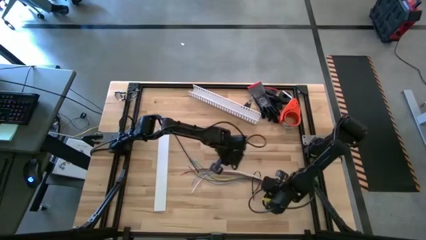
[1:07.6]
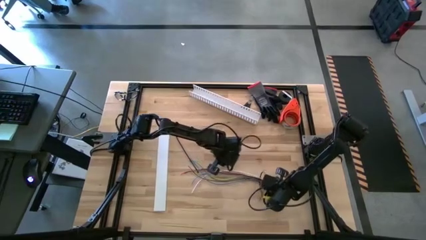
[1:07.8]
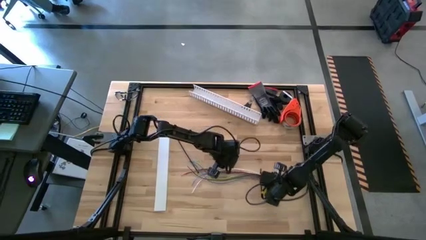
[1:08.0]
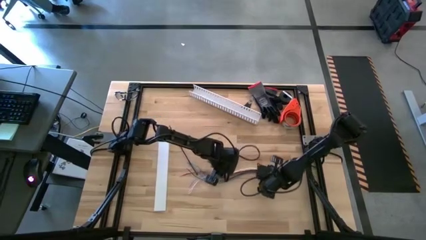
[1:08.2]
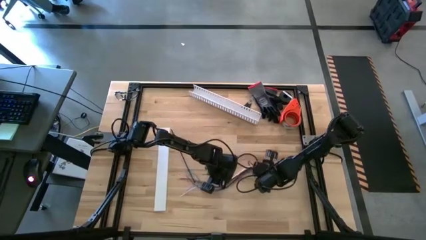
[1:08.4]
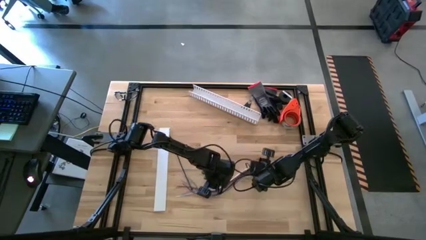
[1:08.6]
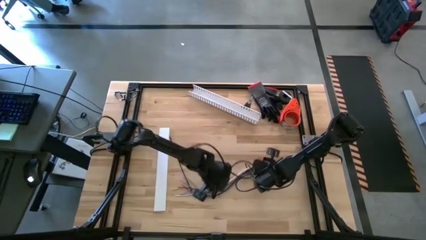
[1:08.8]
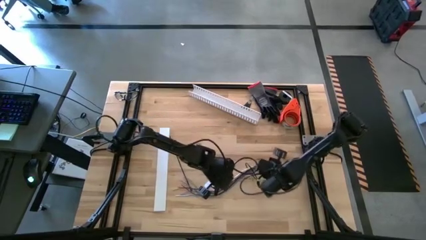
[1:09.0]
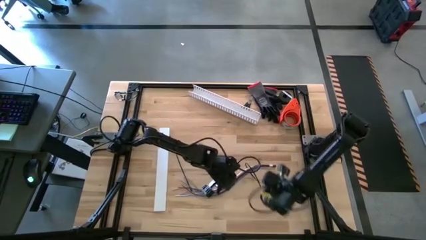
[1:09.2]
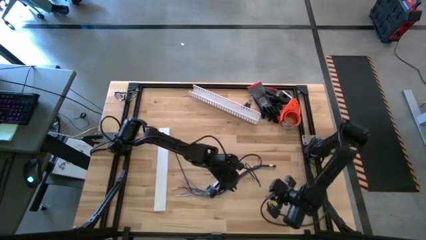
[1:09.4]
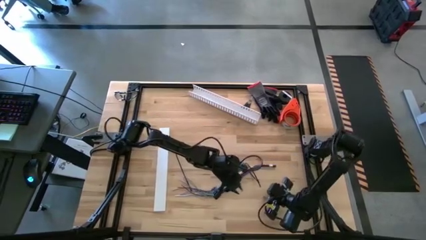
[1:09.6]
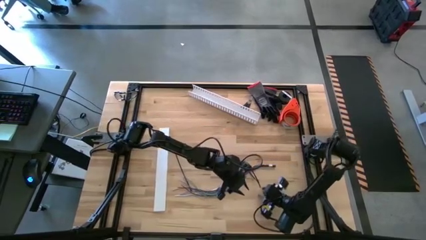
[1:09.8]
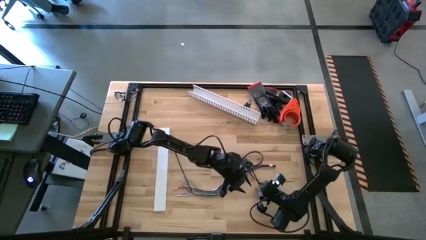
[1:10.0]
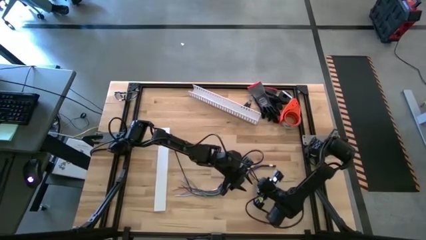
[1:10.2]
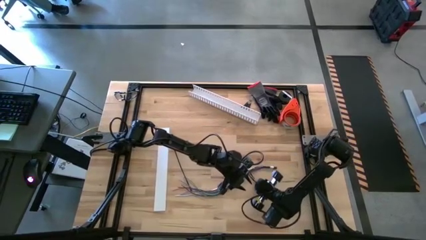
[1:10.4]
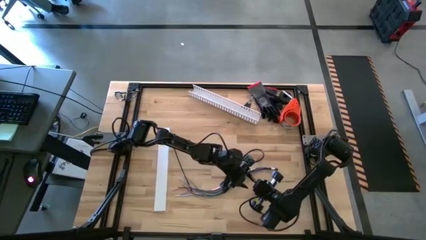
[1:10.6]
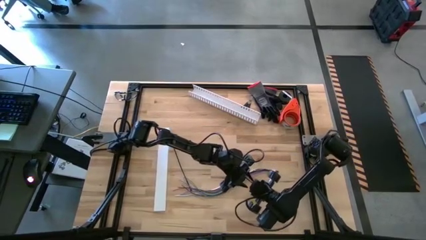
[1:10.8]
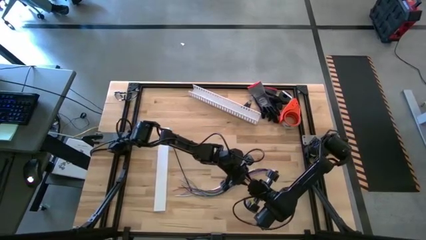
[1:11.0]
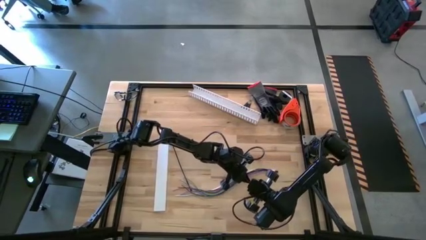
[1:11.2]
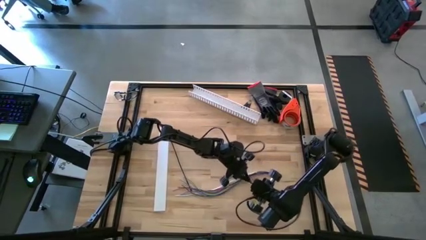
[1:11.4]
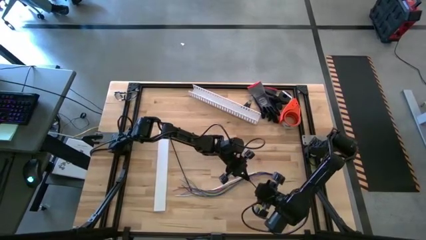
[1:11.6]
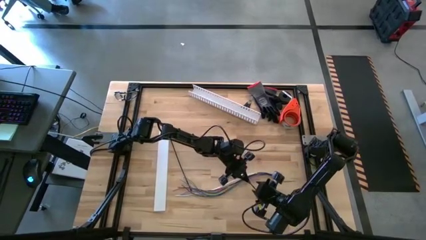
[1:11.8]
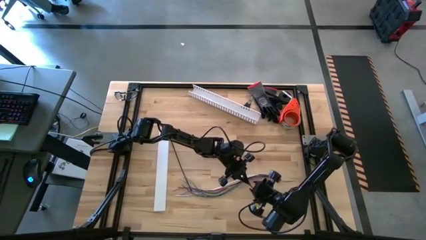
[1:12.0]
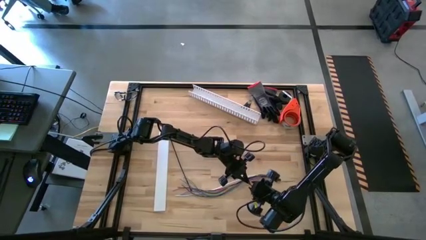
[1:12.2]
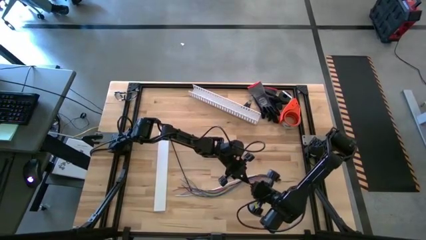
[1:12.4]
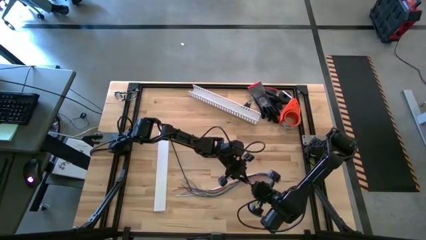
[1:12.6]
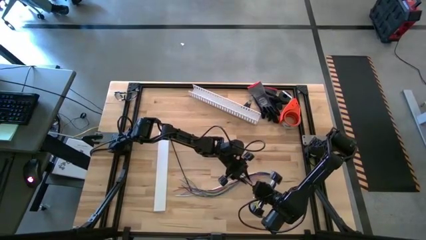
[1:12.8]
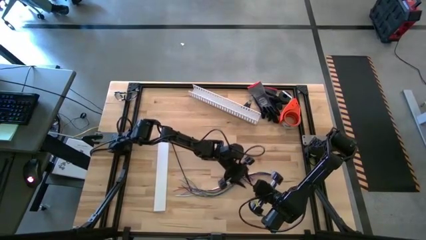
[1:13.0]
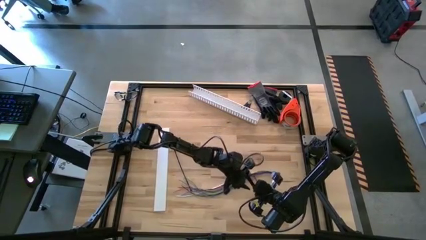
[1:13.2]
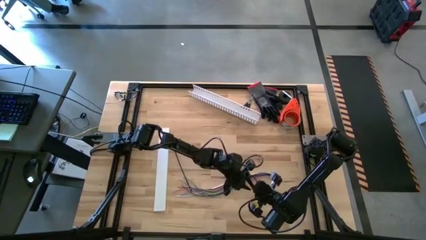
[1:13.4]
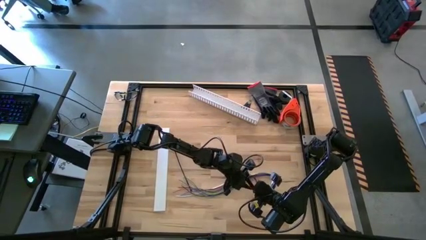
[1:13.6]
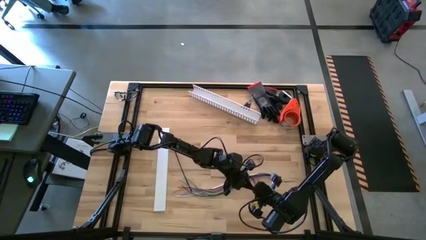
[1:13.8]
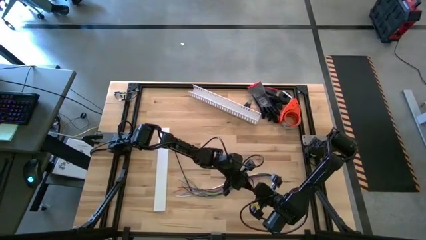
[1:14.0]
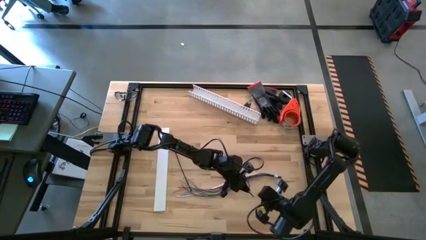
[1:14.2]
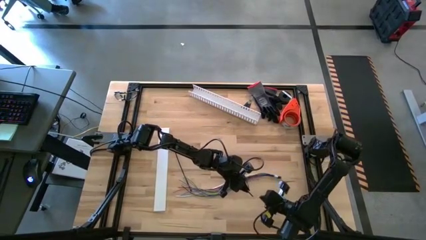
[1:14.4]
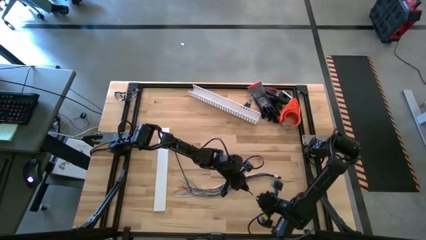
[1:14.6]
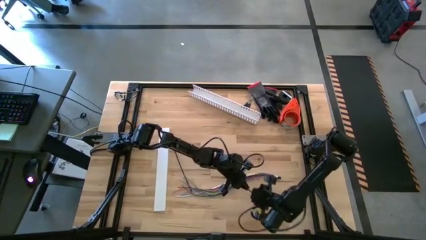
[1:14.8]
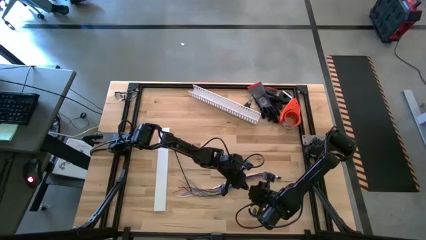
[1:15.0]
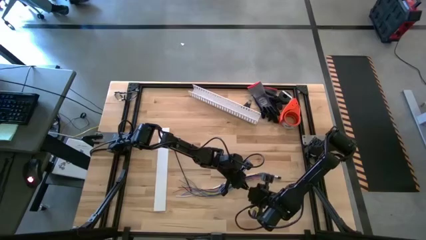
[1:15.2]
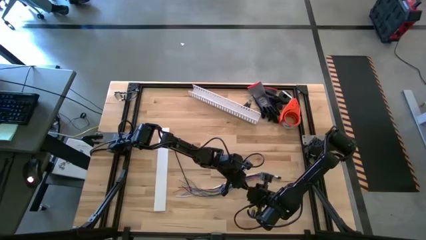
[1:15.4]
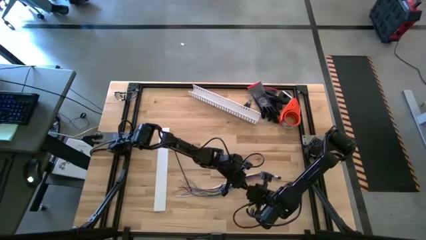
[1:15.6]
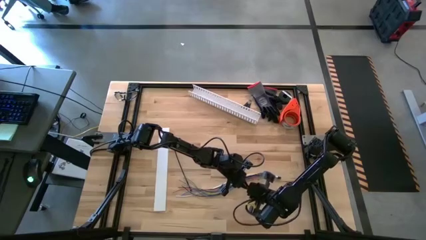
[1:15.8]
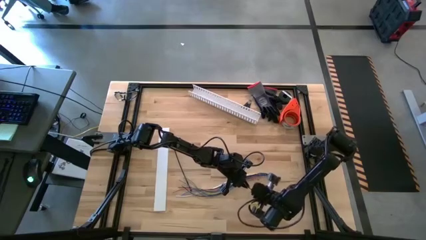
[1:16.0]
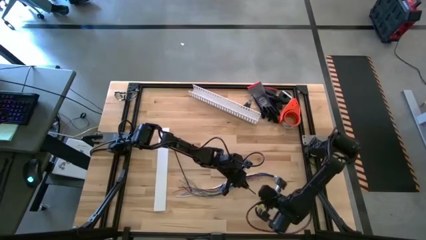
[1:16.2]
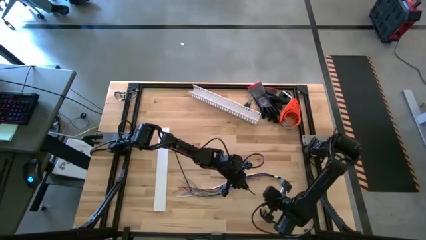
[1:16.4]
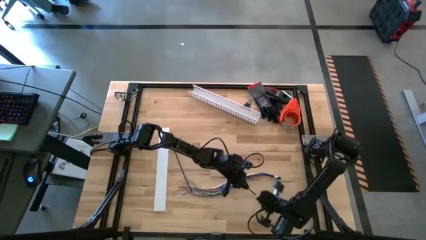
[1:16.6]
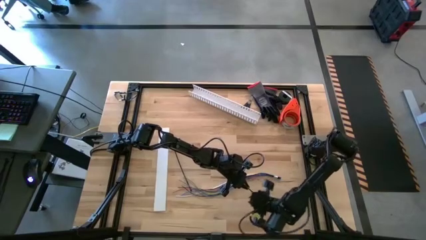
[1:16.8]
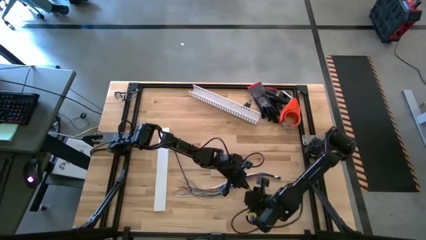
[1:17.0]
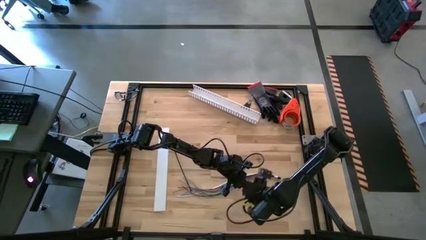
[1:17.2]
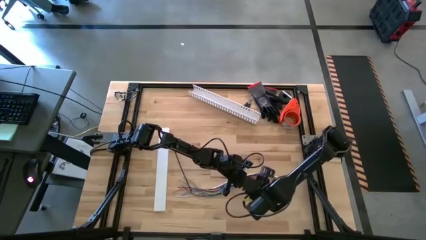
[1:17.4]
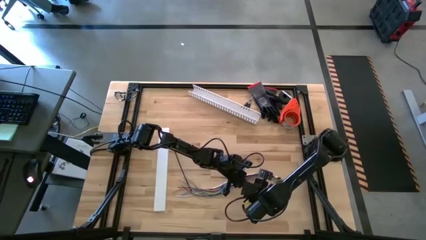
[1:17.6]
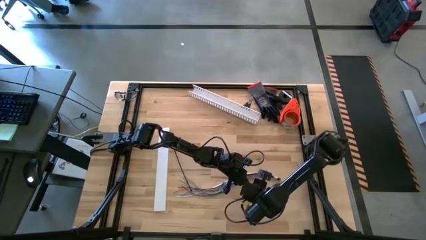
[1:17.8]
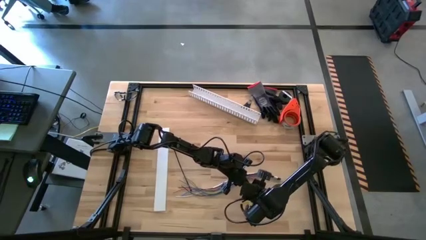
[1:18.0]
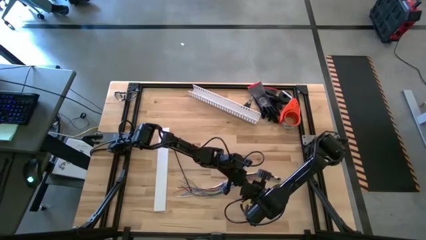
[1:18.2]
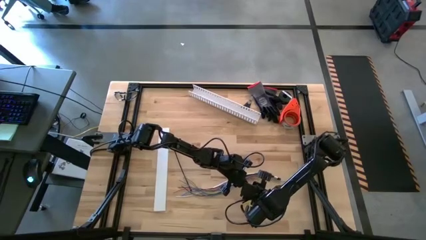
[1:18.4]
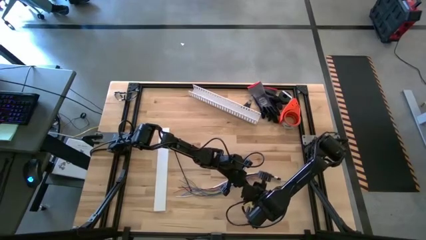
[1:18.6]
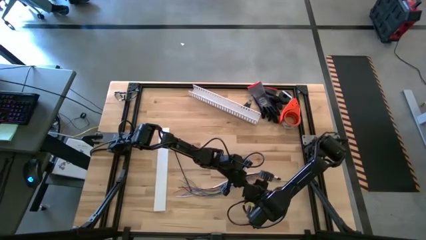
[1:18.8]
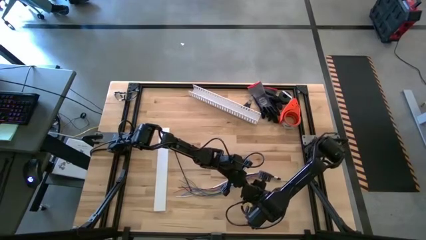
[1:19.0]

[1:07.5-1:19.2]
Task: Ziptie cables
Wrap the right zip tie on the cable

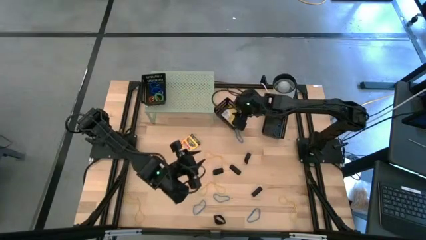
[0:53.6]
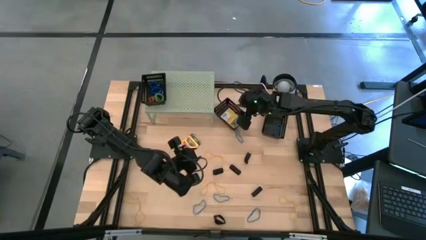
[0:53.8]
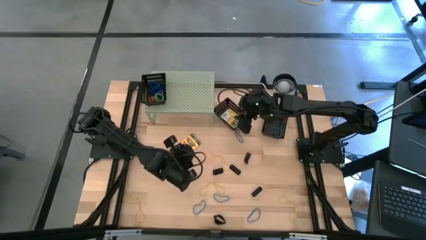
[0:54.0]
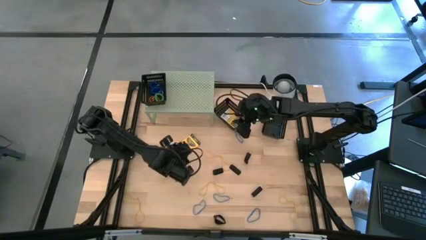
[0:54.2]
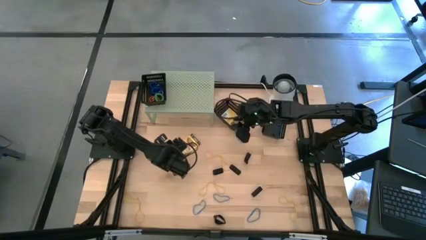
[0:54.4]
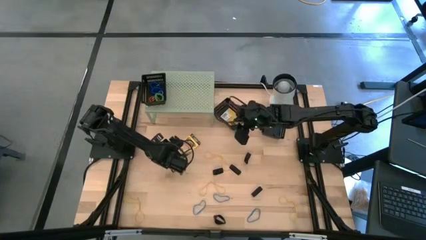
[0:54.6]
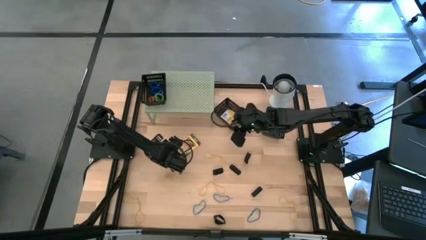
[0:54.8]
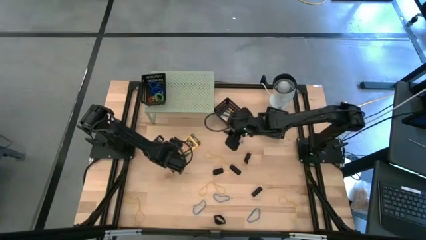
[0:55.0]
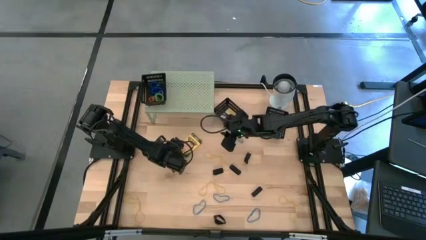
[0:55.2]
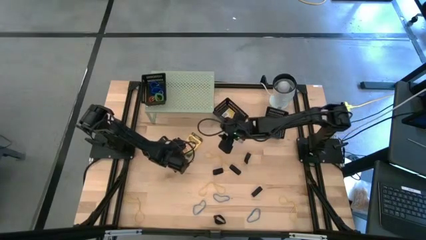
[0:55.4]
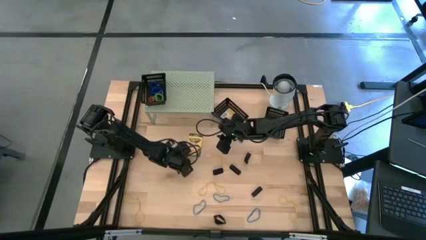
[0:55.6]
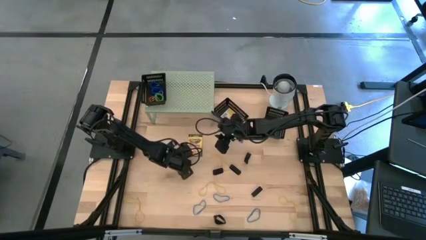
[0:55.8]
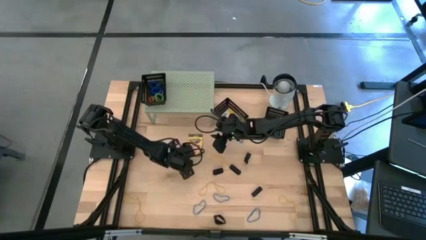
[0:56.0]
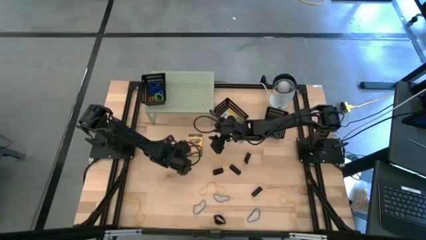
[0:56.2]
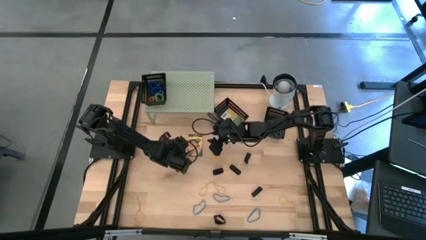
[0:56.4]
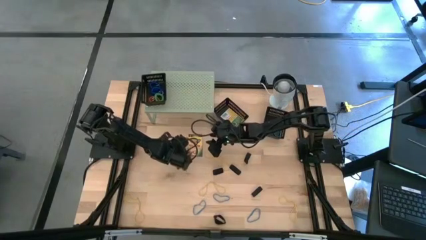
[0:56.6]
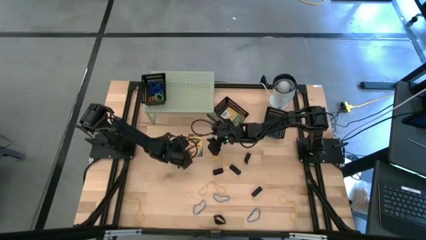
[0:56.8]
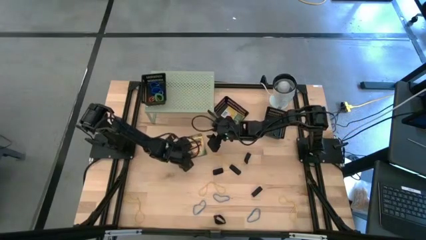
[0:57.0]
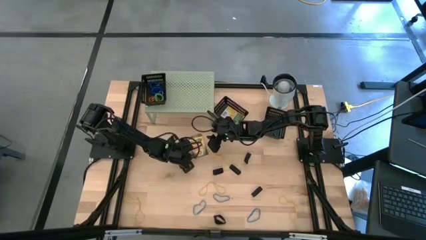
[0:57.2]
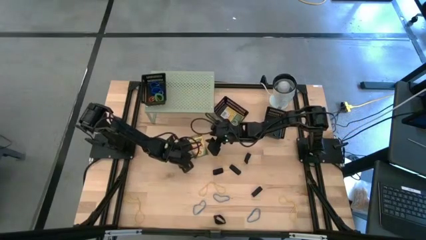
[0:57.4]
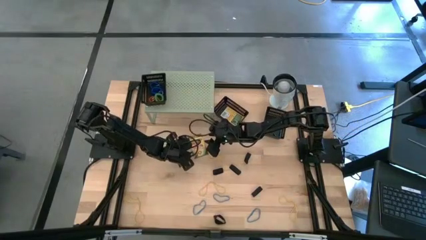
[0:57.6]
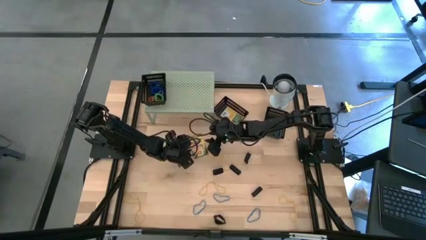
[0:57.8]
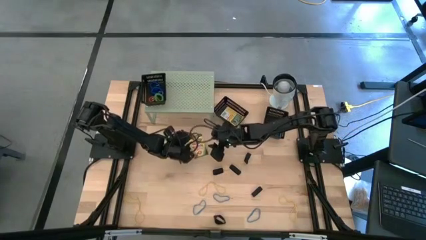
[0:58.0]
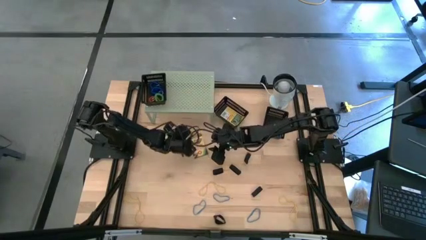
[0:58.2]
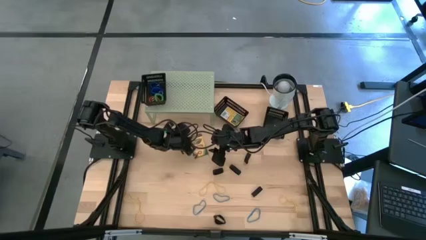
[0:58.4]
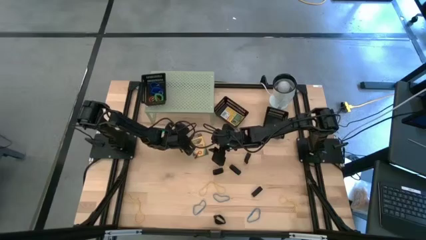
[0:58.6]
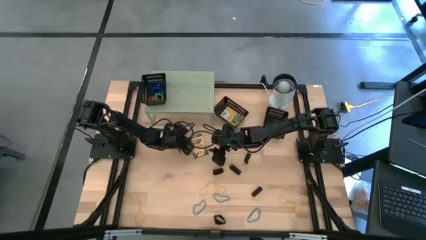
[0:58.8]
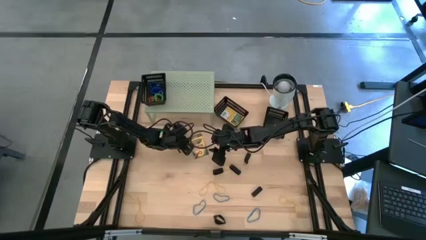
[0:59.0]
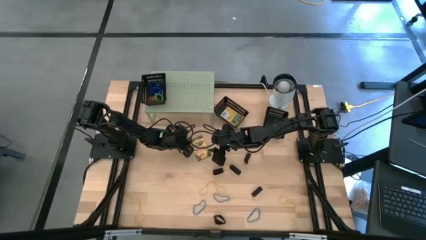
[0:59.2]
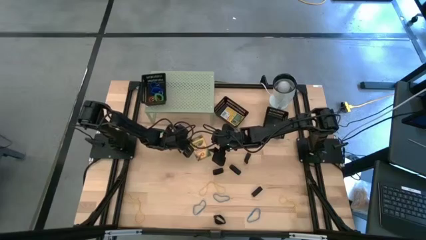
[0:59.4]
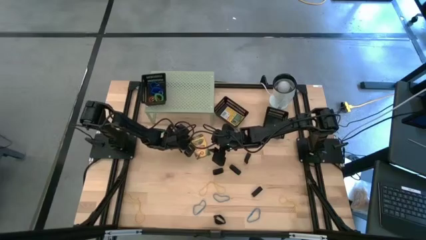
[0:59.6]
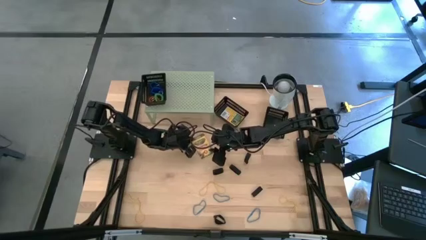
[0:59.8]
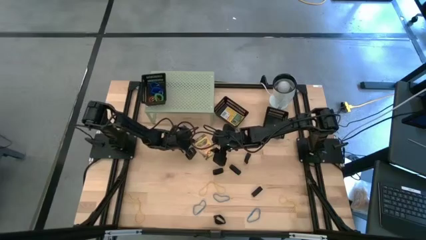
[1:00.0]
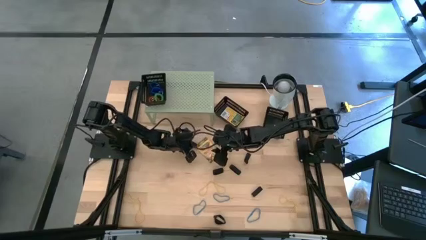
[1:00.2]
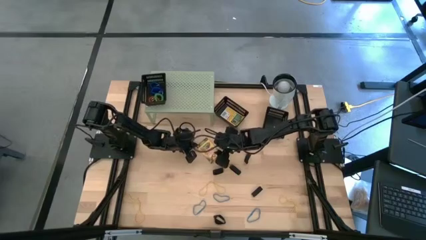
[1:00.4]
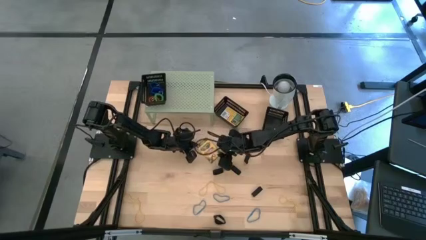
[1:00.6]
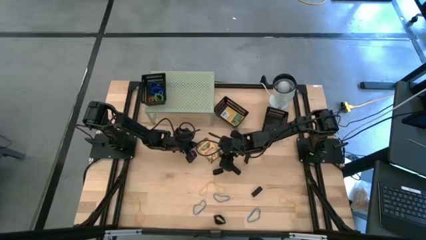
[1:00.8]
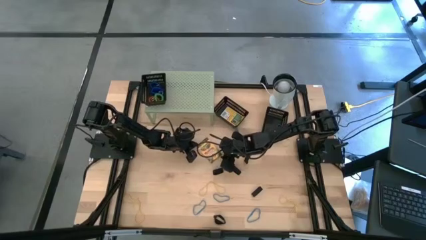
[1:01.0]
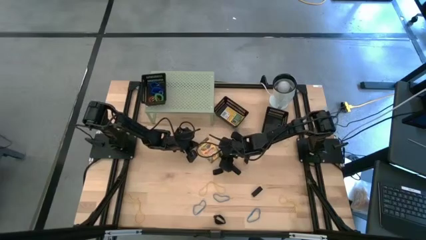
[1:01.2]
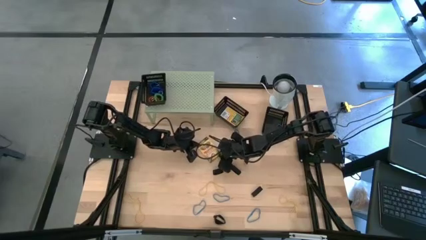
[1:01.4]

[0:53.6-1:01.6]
Task: Pick & Place Office Desk Supplies
Put the yellow crayon box into the left black bin
